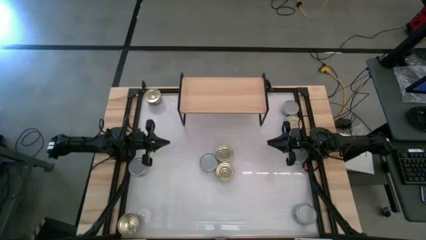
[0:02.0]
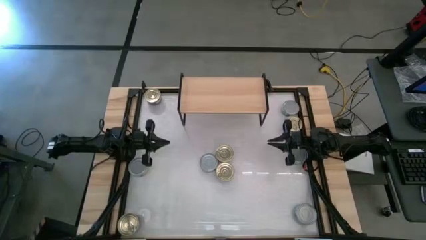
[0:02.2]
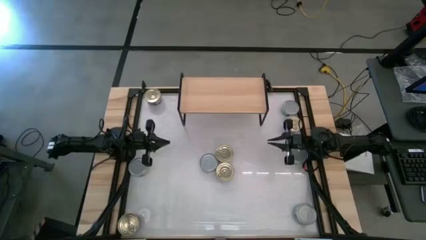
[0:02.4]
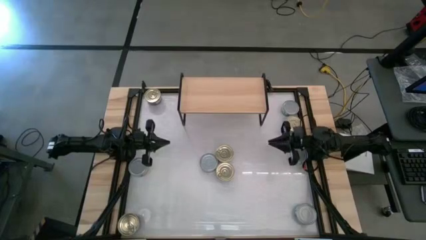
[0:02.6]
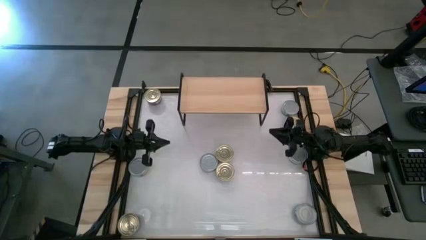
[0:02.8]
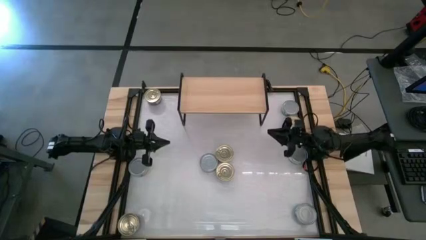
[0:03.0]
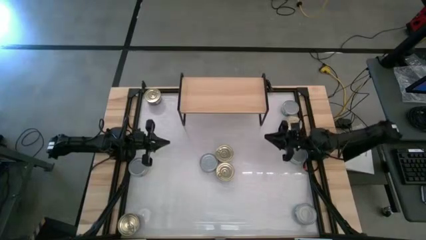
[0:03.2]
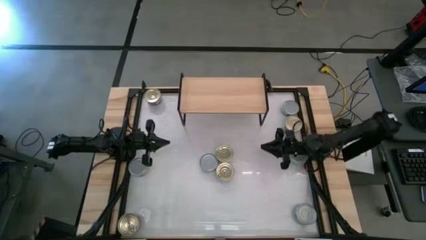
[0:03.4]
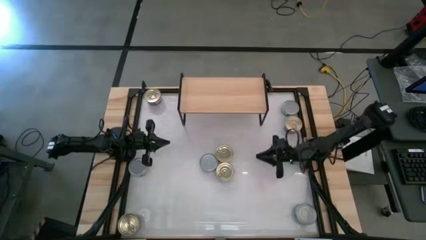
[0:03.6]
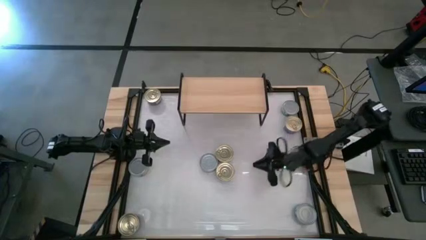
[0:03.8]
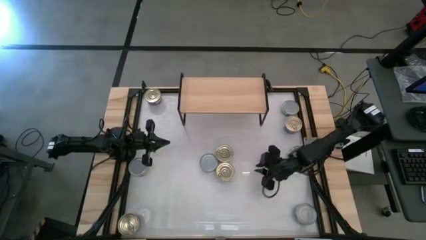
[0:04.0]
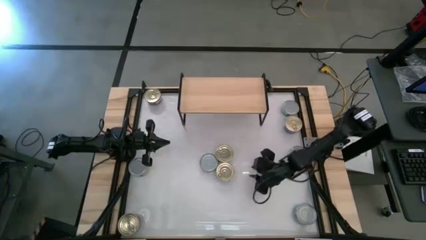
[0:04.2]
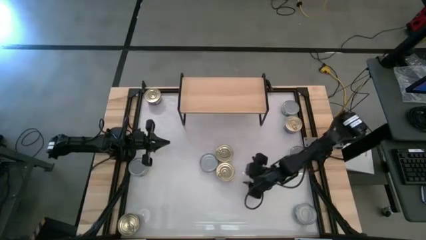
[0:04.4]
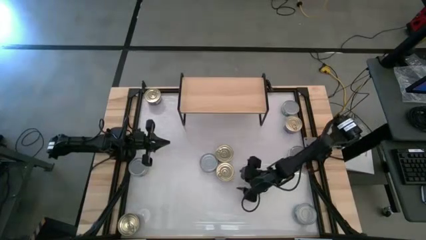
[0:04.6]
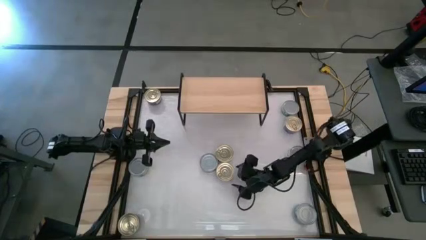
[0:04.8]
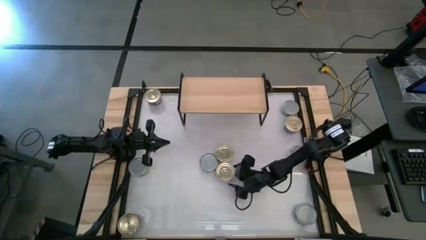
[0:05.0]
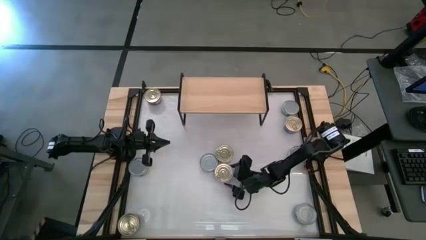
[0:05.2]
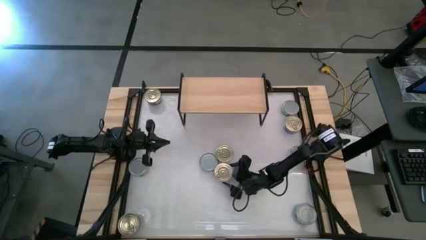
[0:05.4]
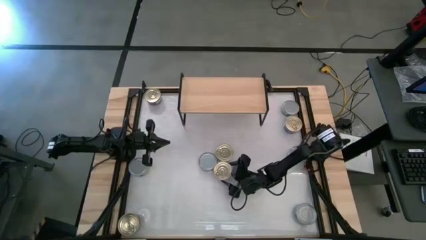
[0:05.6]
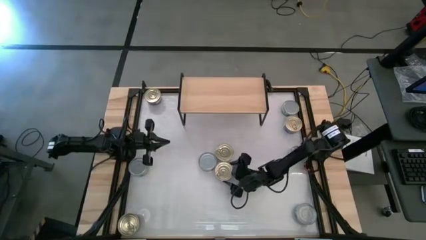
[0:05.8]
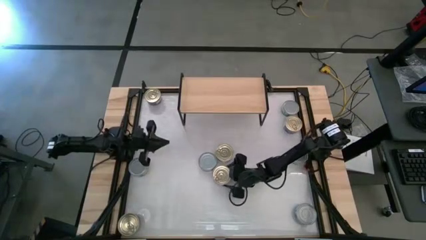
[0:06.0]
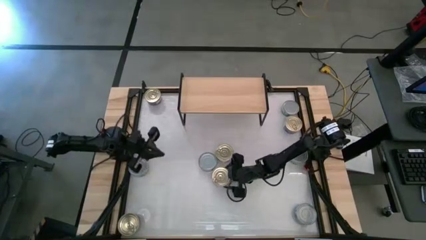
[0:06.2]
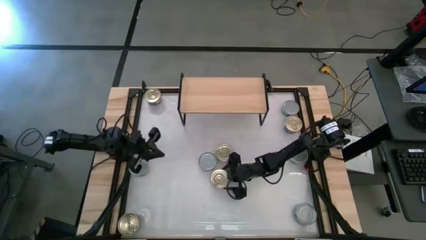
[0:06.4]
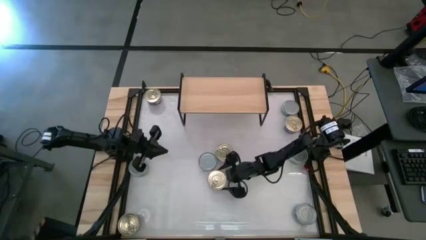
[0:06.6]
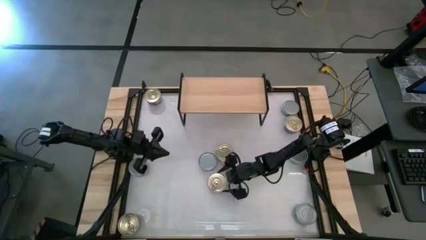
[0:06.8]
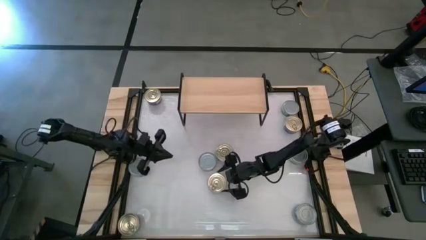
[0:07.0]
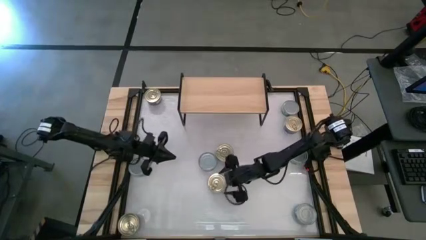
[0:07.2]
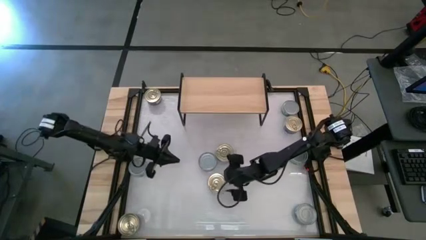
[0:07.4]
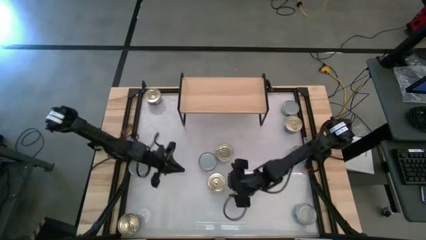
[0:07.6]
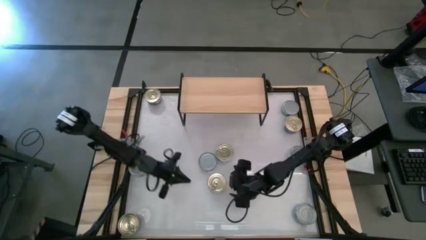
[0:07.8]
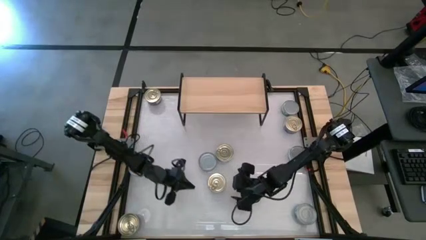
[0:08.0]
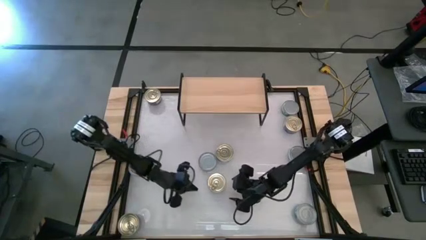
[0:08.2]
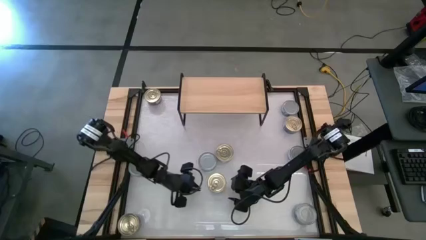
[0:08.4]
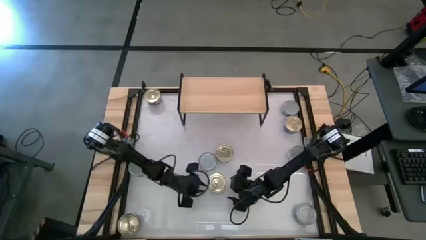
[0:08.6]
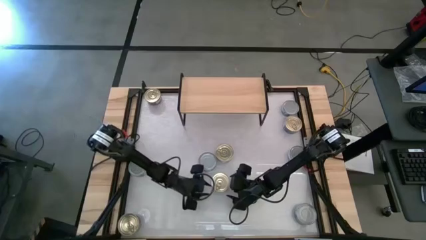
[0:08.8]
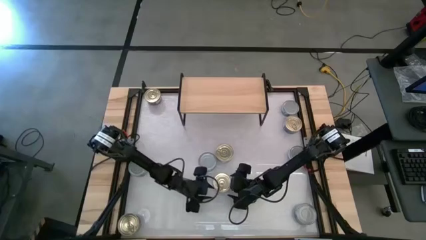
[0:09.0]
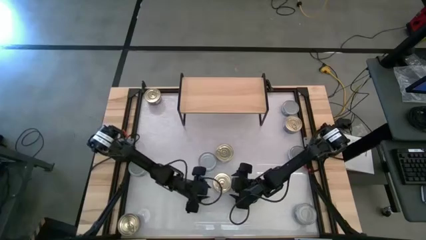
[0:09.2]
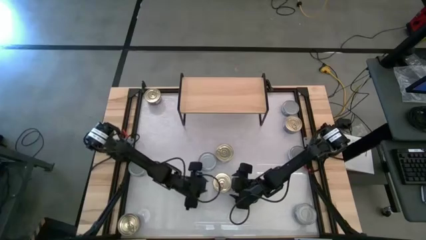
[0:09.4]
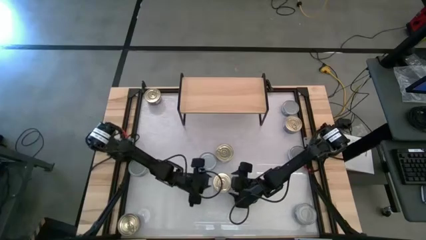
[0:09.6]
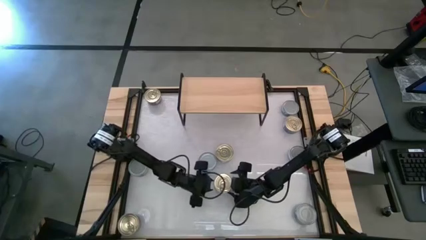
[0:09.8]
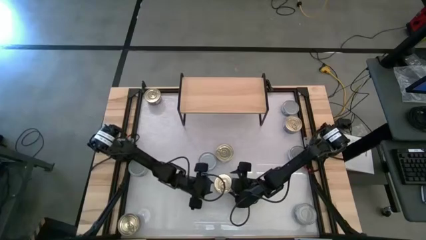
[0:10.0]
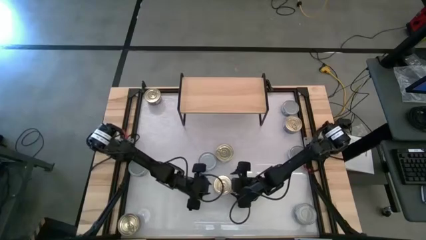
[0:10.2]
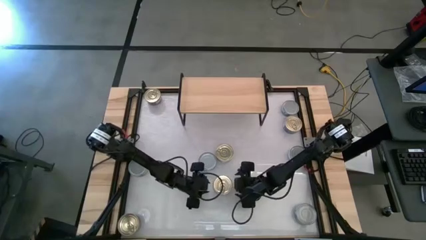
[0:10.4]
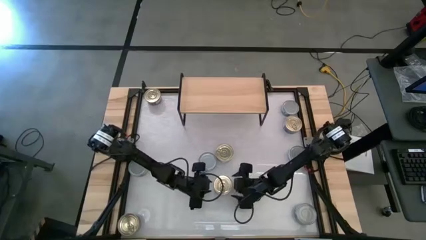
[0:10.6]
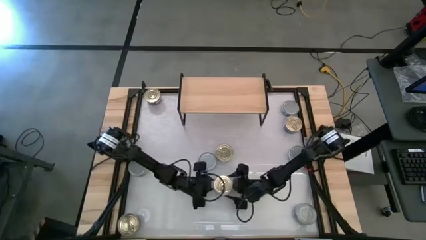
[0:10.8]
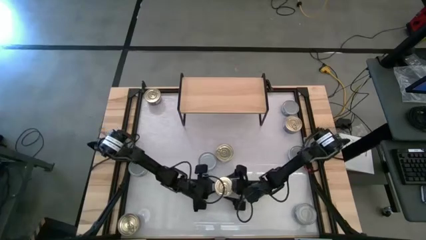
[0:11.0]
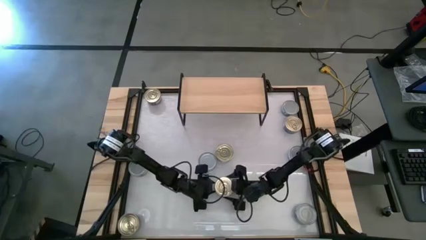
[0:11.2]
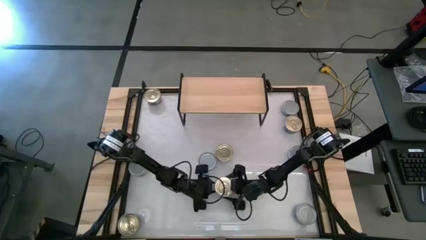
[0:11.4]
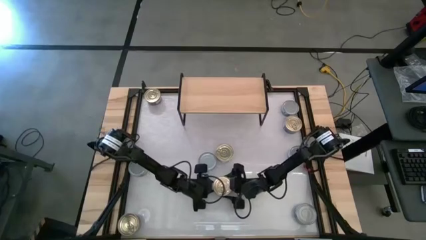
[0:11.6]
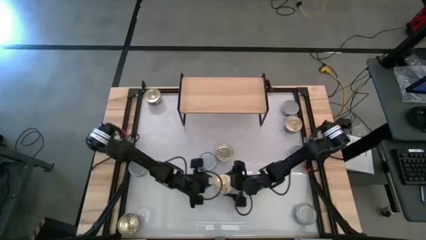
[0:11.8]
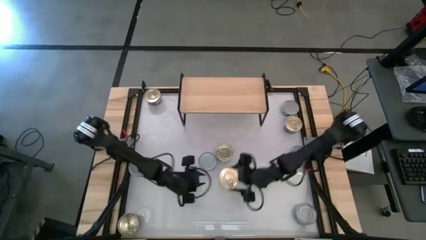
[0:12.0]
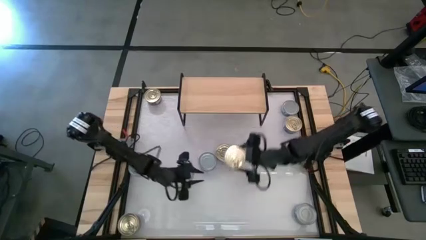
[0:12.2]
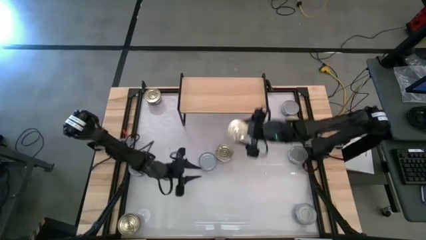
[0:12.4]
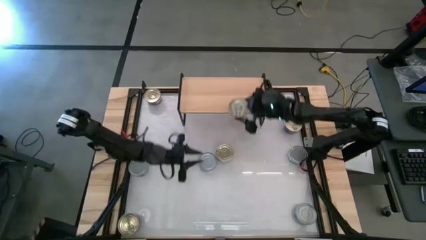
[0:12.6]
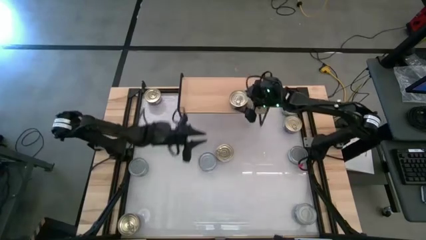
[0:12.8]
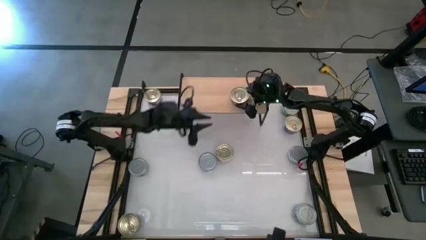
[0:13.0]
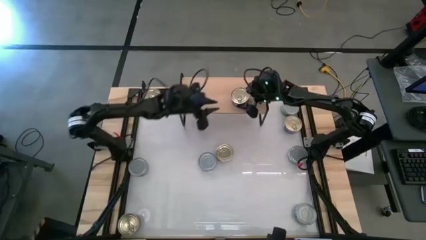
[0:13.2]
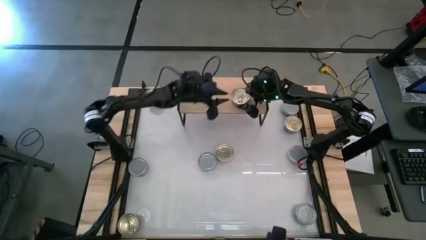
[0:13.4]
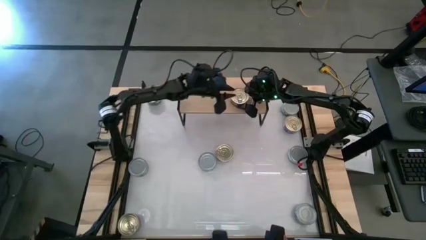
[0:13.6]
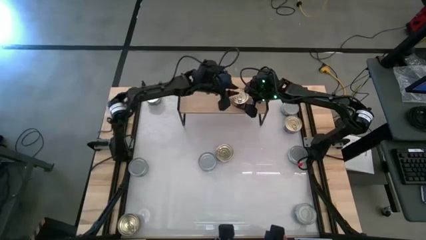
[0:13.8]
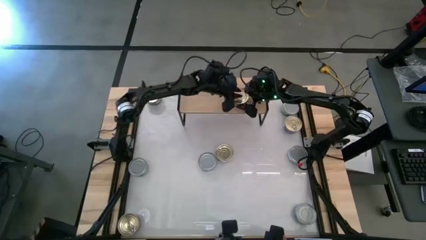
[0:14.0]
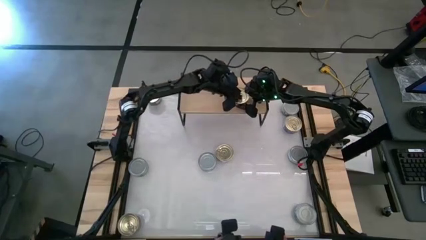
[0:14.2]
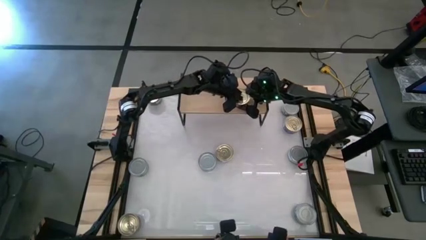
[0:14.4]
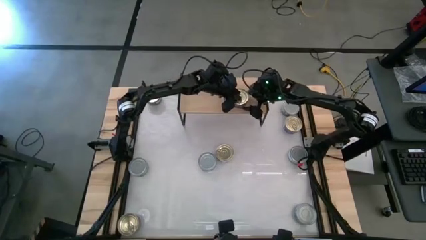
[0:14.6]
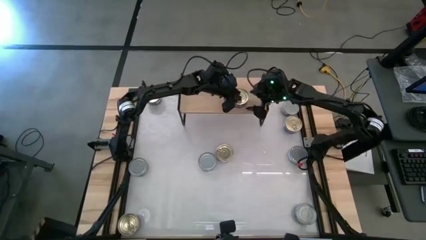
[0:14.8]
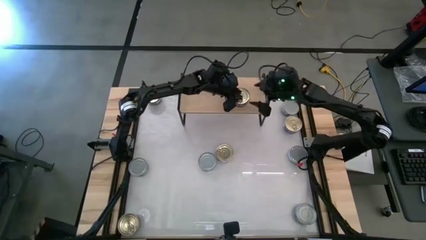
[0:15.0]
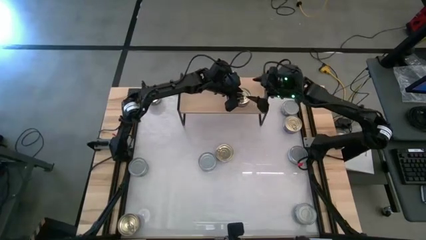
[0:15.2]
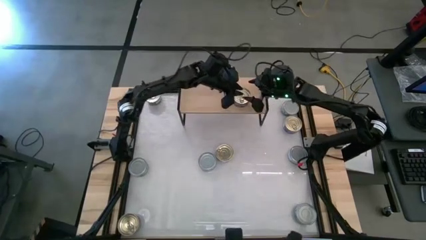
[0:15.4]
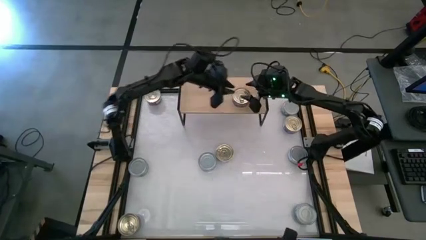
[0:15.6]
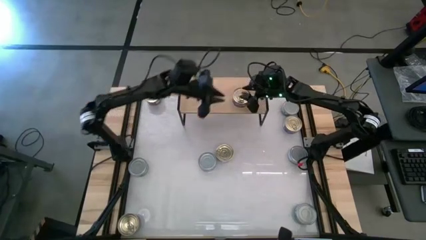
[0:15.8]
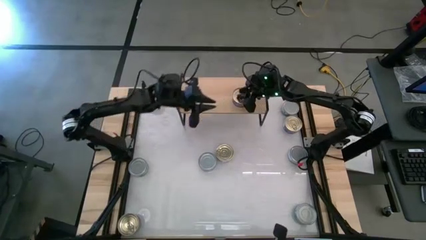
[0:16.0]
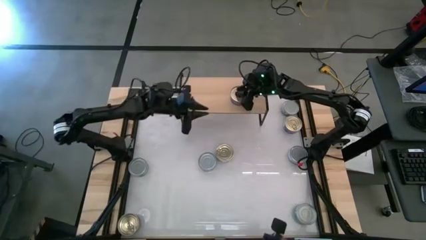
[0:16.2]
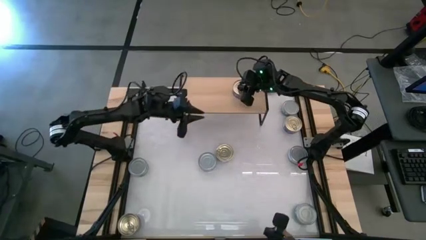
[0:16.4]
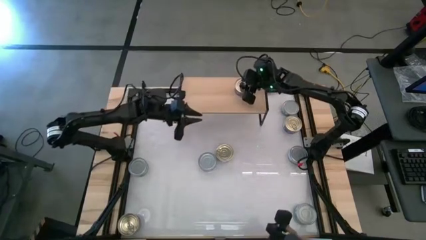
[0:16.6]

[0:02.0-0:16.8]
Task: Stack canned seafood by type on shelf
Put the blue-pink tuna can on the shelf

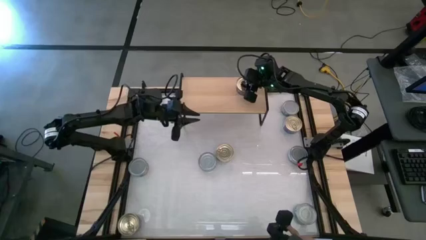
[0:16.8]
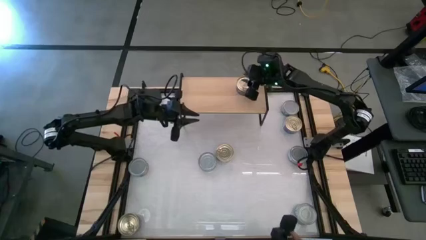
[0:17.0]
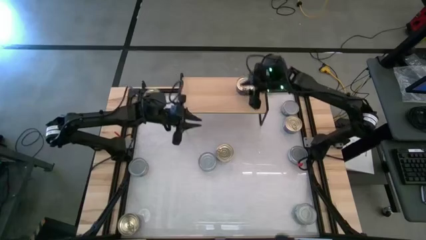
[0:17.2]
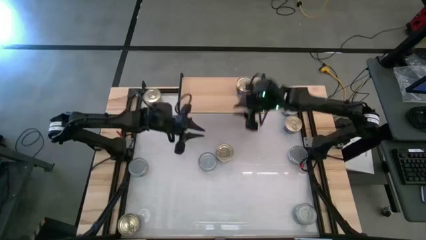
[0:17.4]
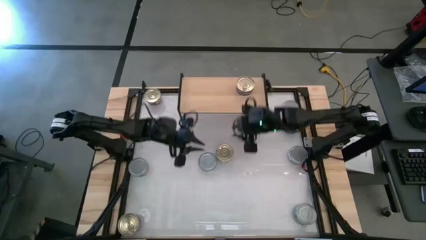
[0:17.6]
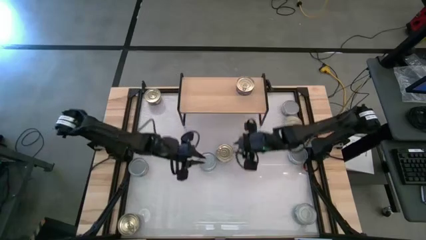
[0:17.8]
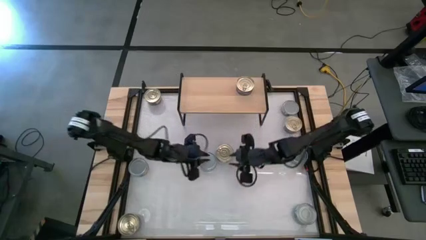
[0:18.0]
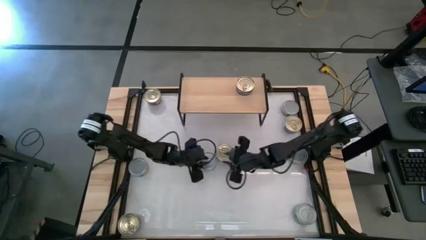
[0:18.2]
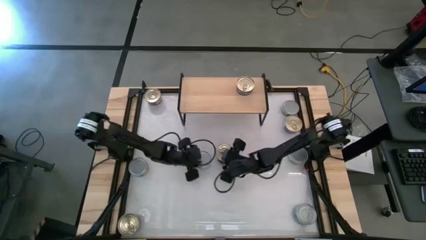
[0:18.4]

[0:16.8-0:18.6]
Adjust the green tuna can on the table
